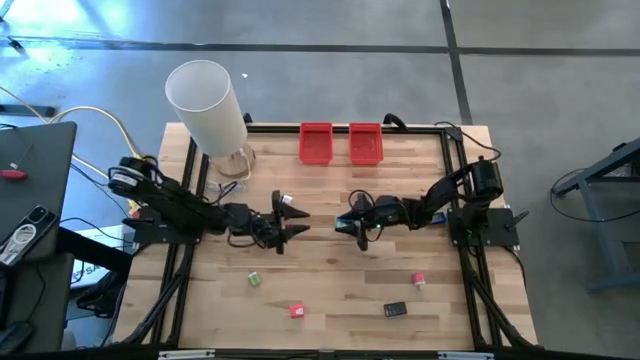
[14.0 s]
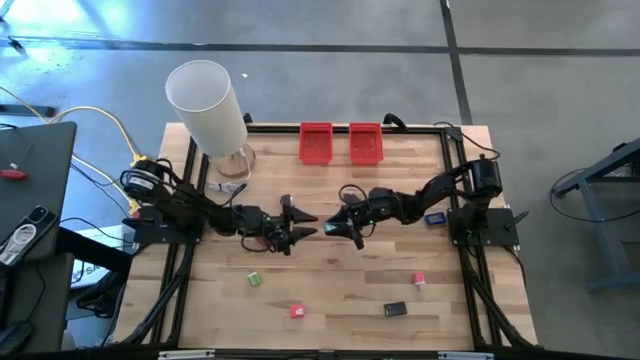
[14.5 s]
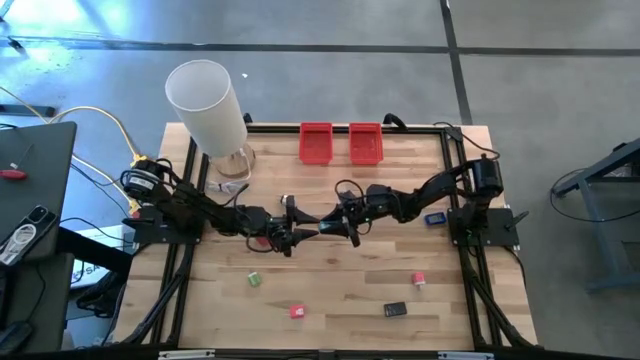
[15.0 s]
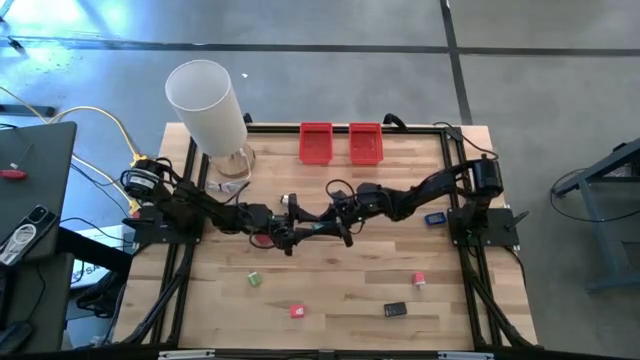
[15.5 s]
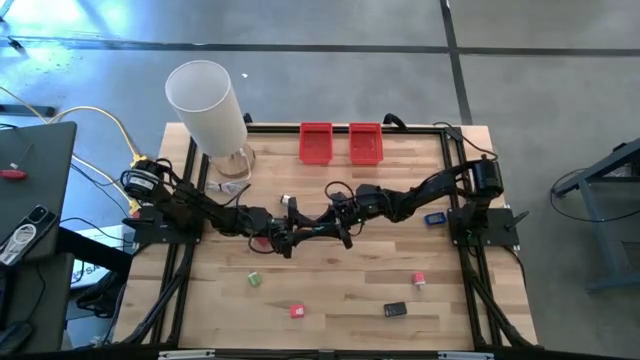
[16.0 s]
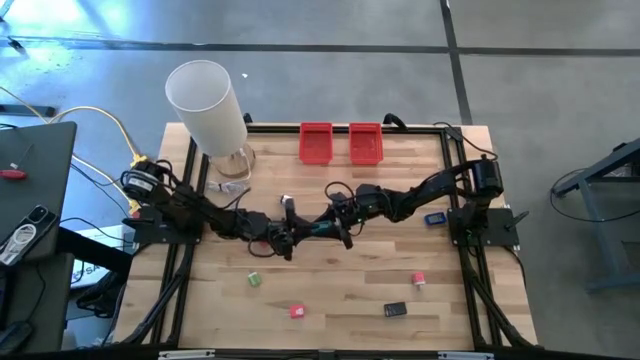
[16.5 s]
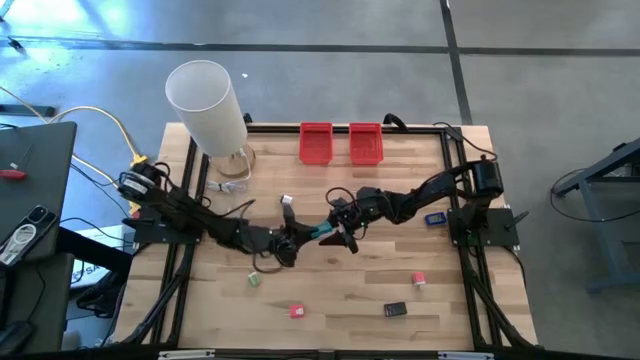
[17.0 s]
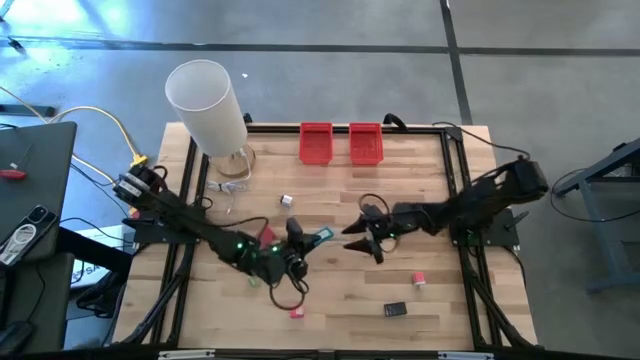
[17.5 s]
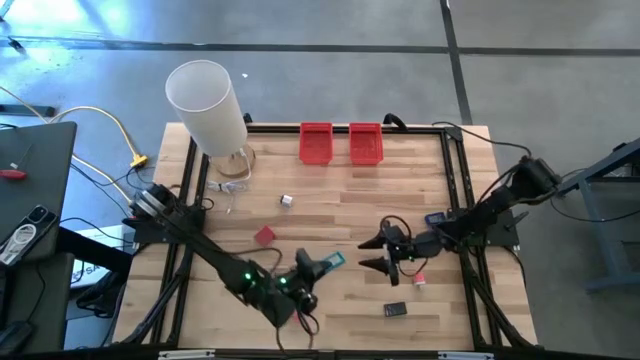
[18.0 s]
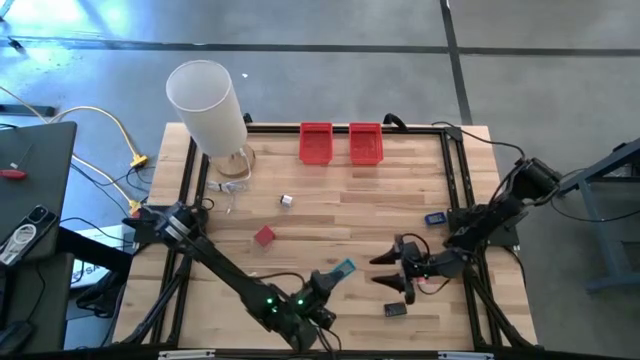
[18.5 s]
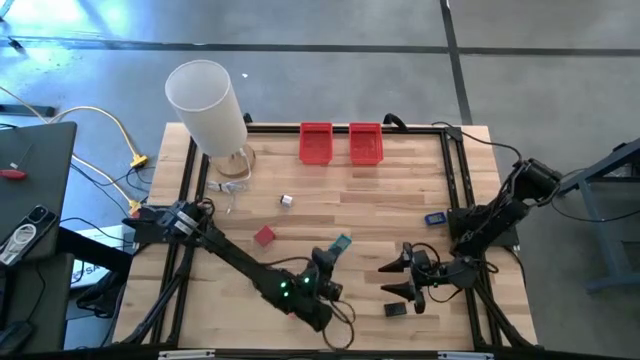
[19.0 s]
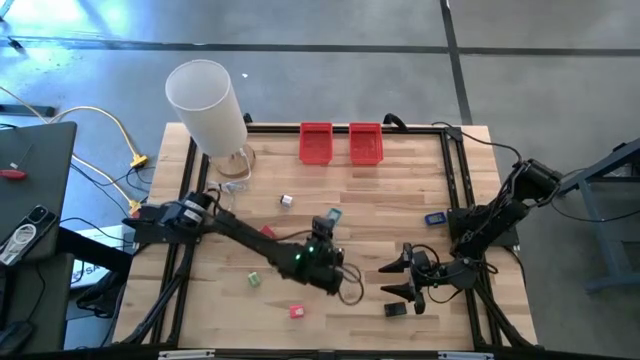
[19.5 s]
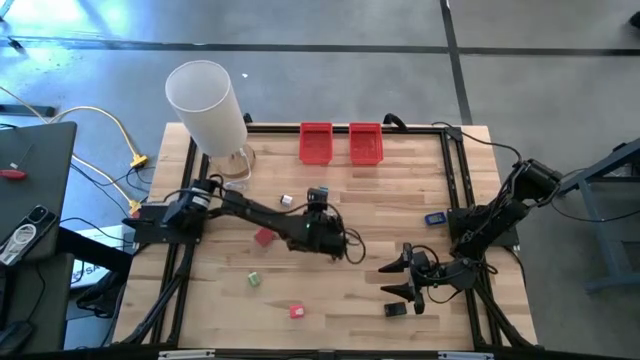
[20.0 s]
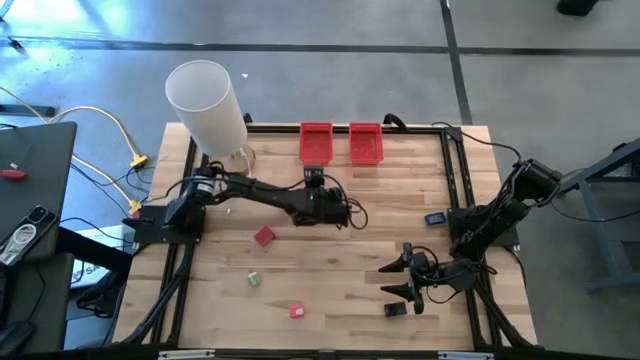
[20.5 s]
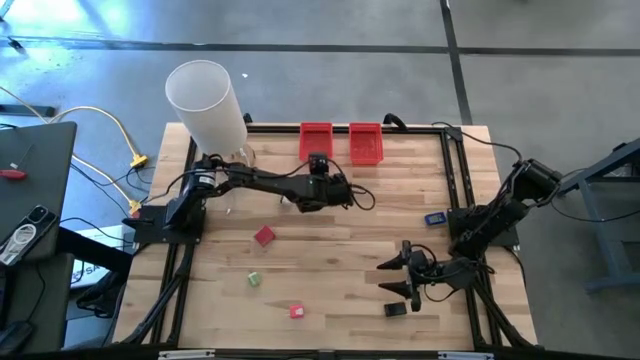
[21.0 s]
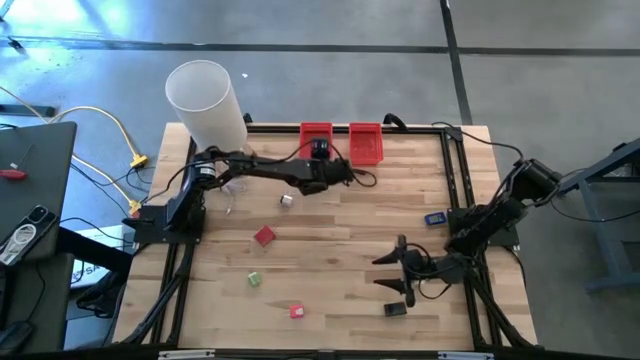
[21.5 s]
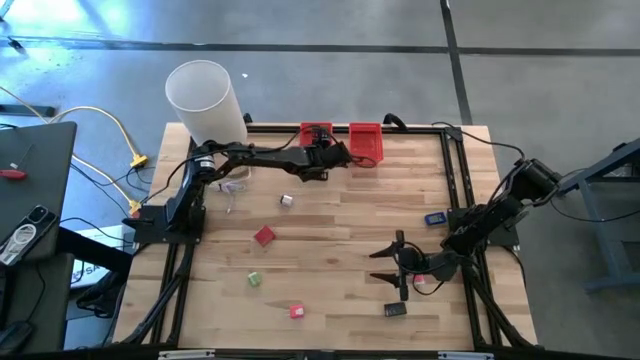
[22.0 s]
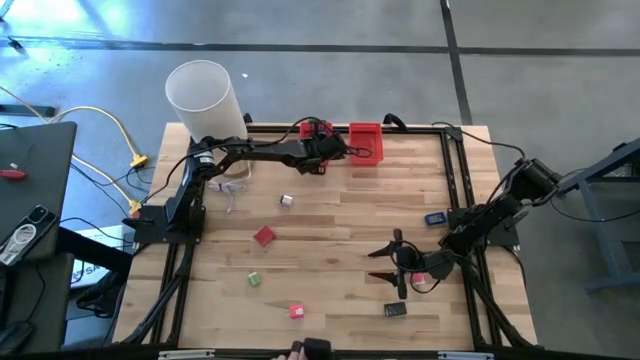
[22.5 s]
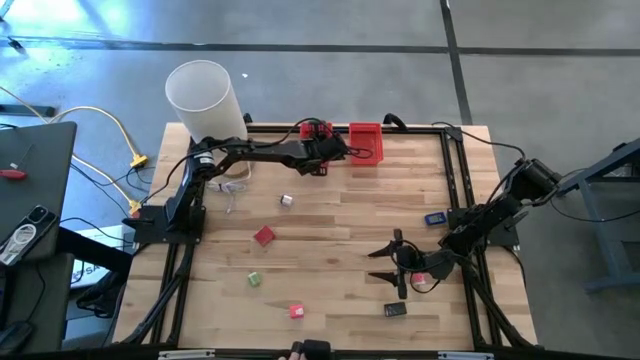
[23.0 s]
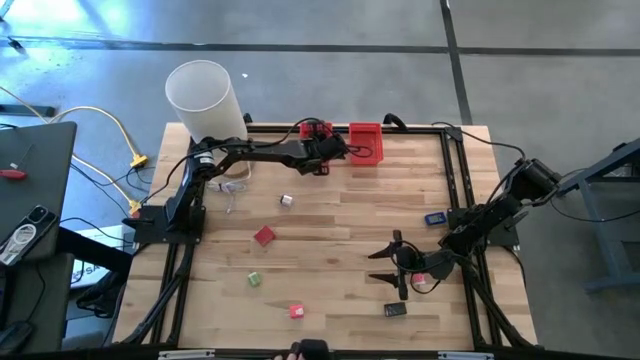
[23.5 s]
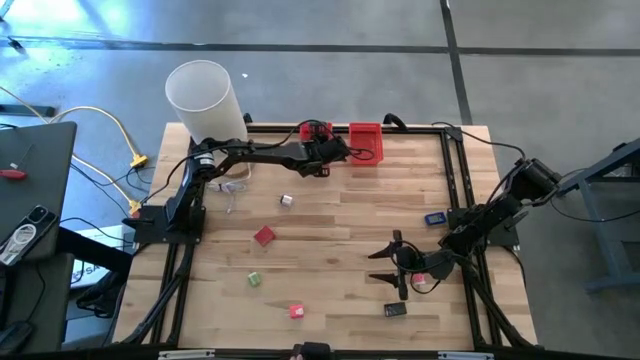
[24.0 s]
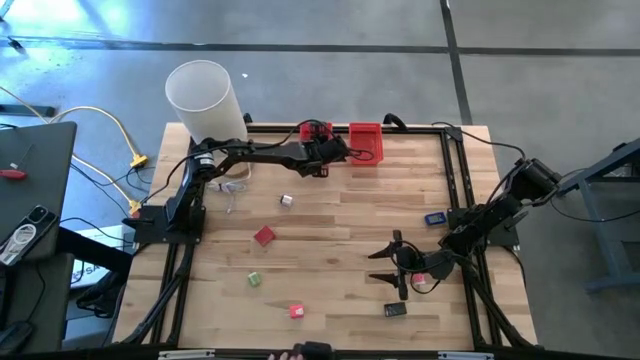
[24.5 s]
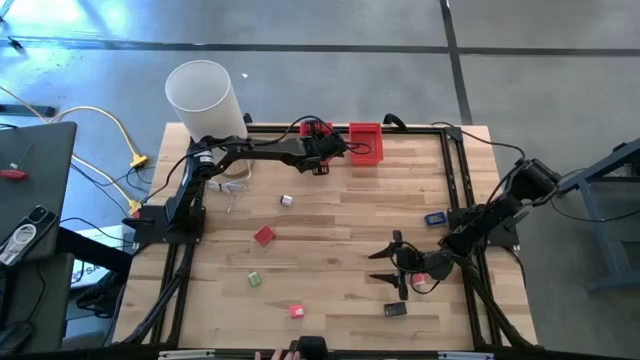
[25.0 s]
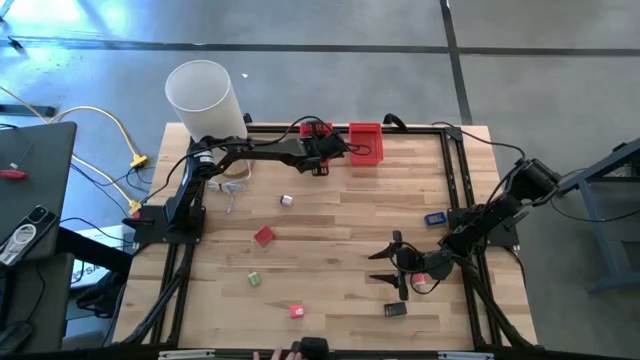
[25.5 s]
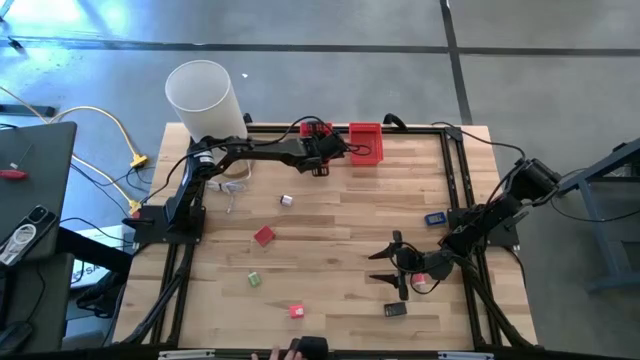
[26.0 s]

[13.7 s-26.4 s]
Task: Pick & Place Office items
Put the light blue timer into the left red bin
